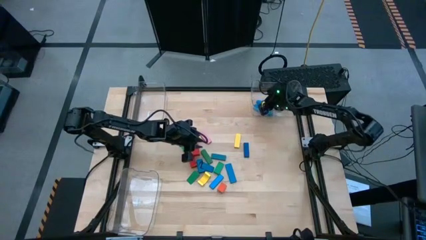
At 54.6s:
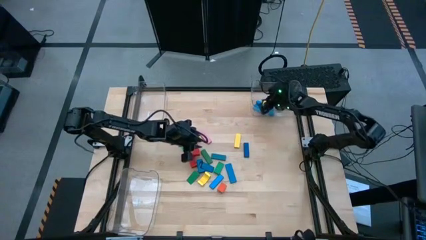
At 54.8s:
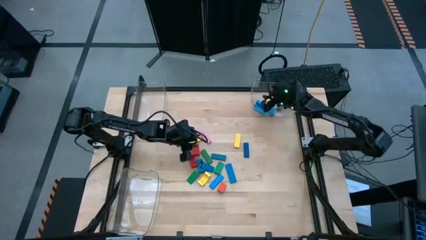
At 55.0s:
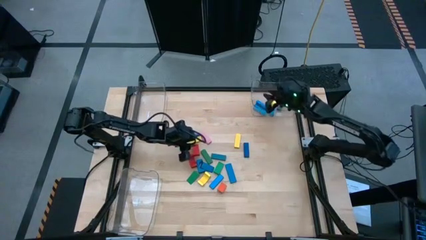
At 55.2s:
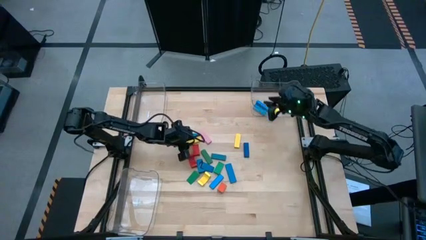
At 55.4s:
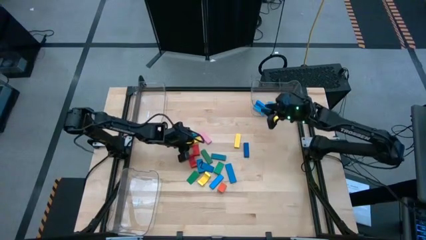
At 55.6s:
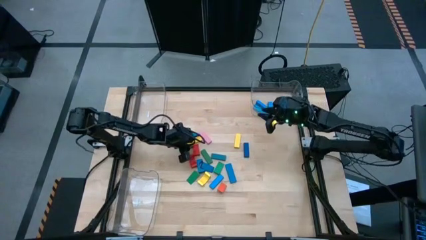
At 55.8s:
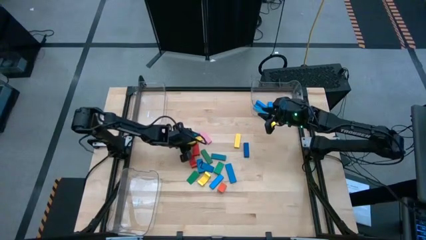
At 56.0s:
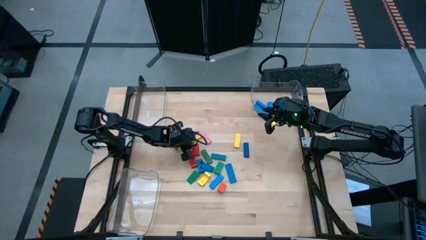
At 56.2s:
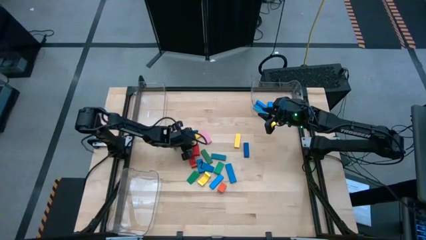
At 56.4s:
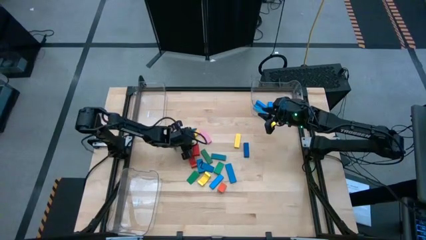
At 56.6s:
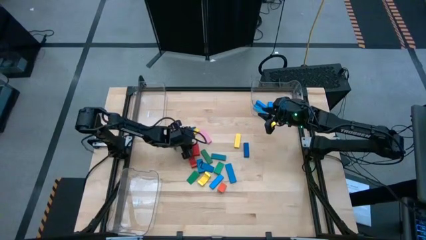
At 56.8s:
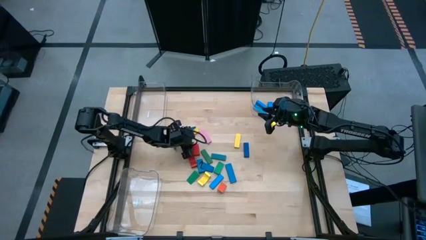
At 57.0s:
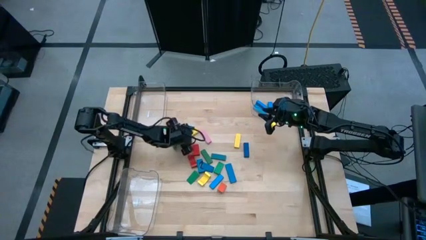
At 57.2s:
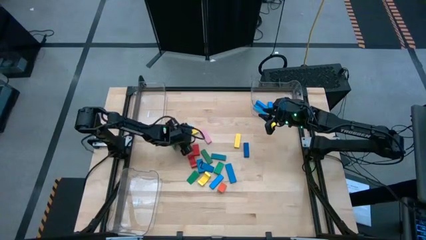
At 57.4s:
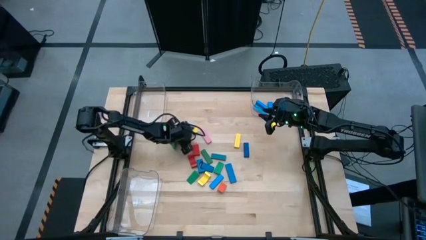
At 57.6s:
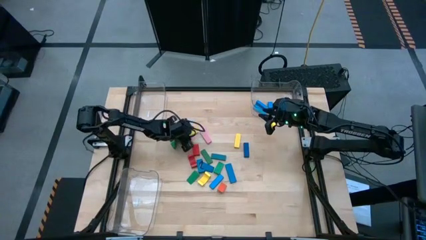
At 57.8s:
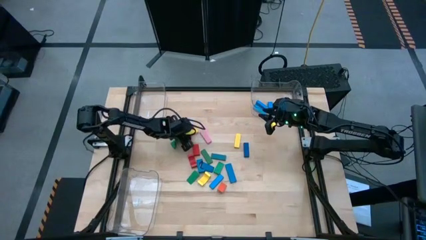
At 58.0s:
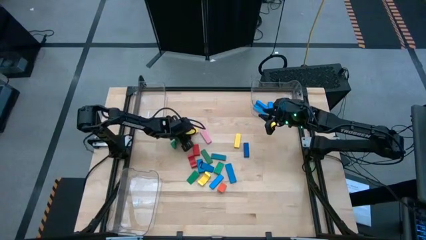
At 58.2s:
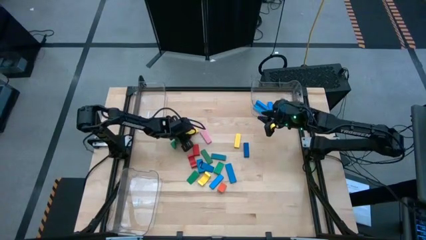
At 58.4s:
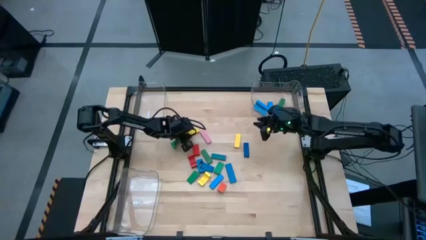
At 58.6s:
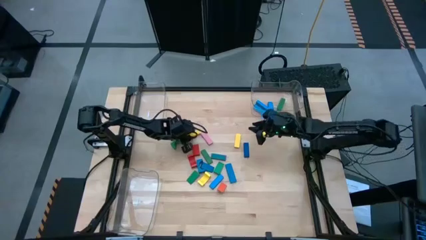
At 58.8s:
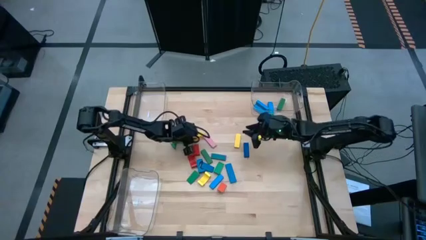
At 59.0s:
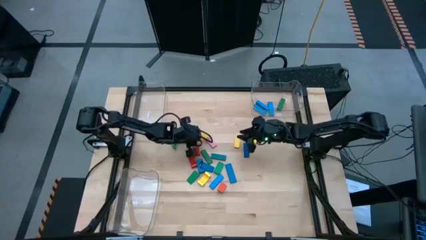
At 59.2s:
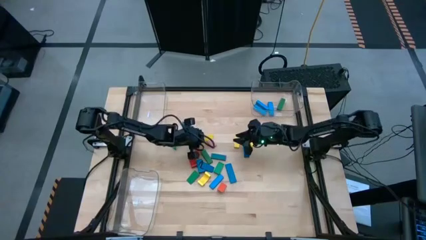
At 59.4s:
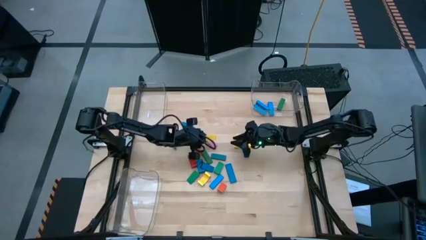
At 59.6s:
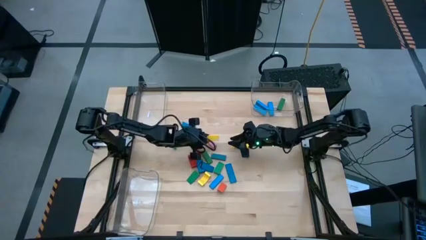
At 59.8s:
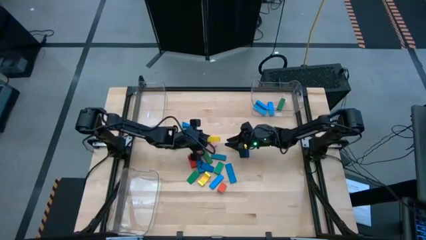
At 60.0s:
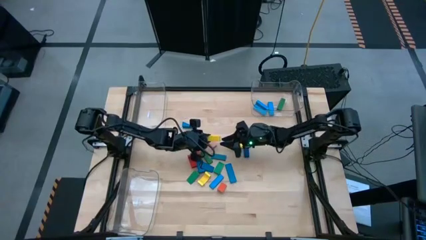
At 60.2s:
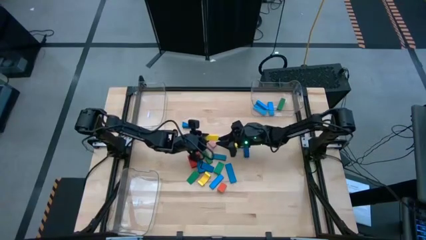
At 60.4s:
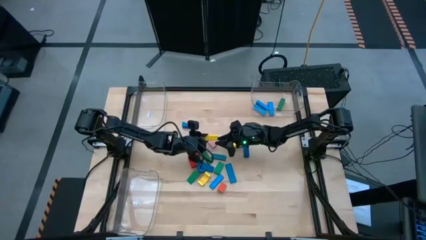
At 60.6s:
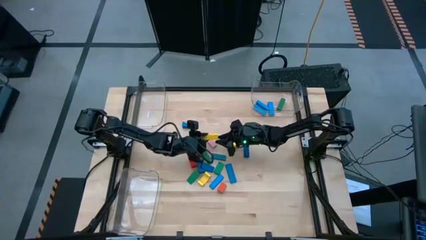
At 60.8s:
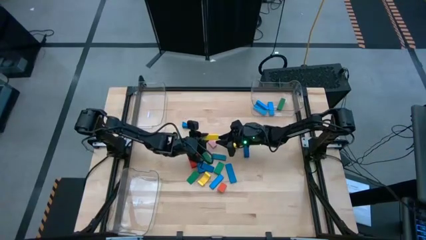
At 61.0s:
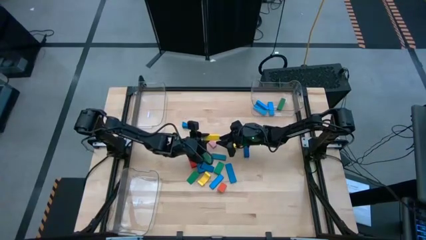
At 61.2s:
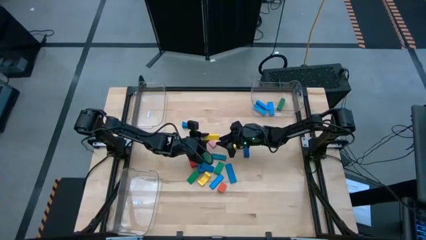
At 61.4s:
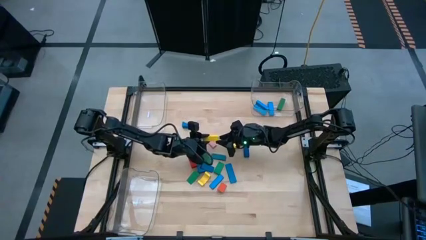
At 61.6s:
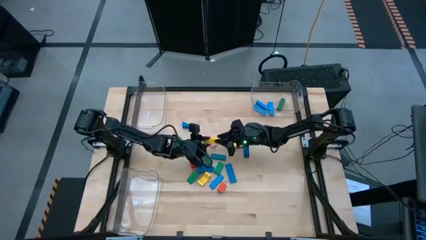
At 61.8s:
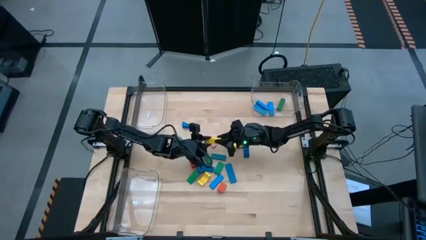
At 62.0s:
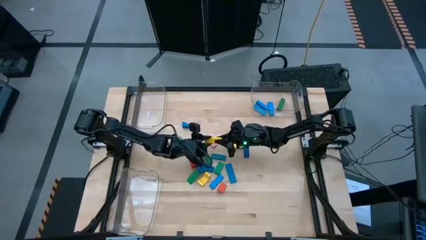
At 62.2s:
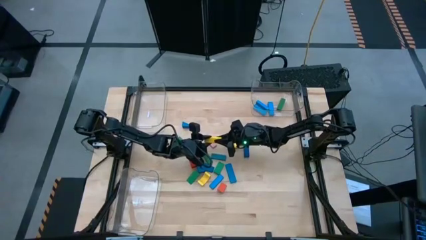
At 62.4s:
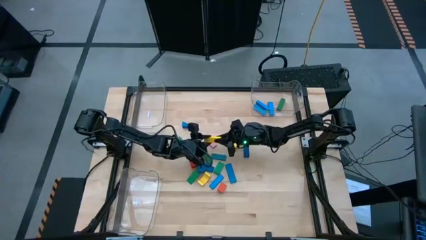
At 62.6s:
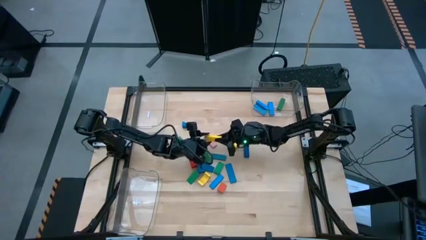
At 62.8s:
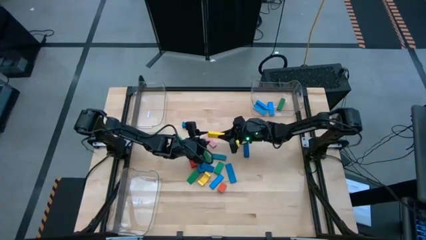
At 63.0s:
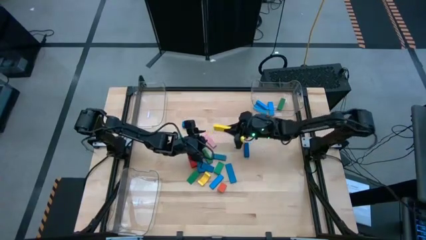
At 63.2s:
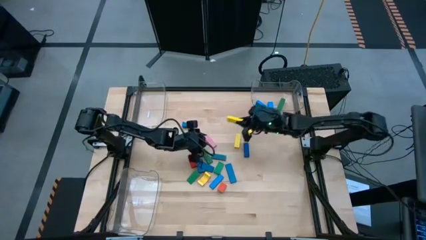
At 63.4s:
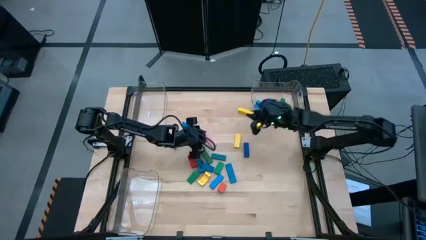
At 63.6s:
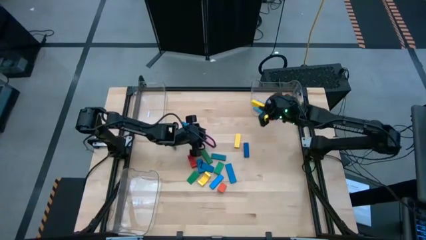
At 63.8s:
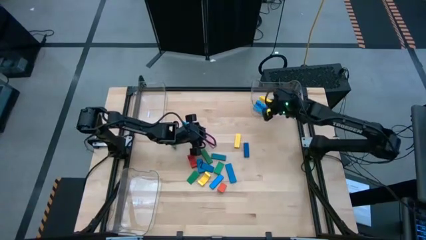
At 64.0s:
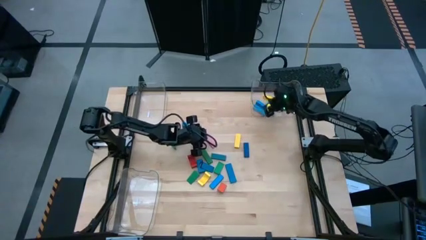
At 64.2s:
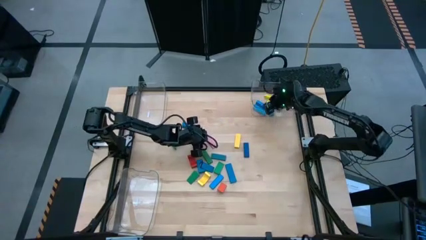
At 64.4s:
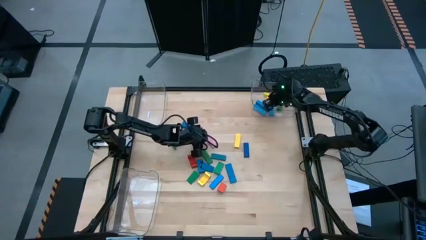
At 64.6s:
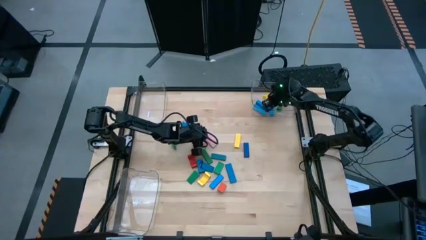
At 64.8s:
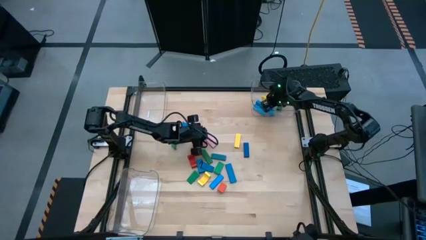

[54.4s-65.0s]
Task: Sort blocks by size
Put the yellow rectangular block into the top right transparent bin

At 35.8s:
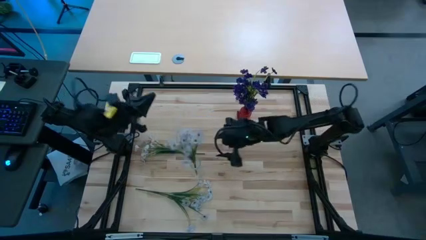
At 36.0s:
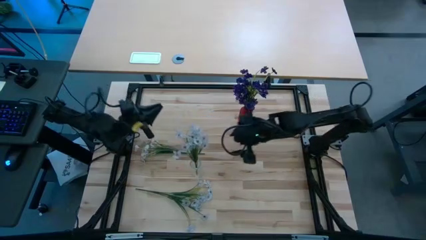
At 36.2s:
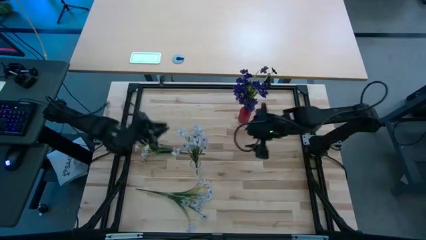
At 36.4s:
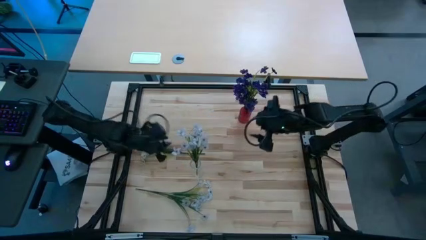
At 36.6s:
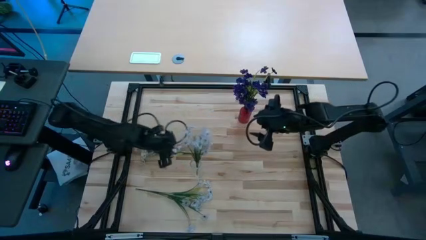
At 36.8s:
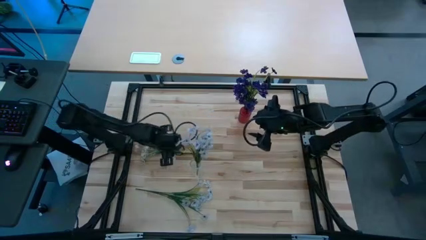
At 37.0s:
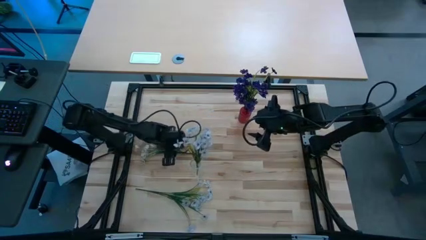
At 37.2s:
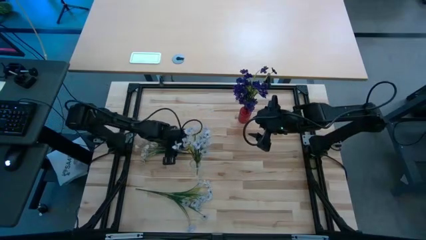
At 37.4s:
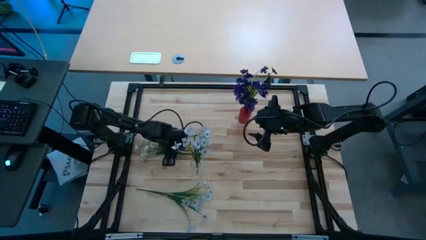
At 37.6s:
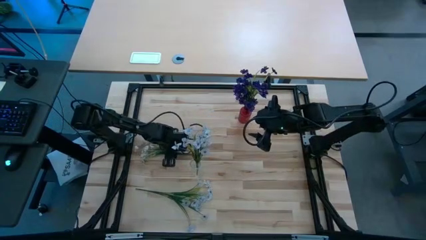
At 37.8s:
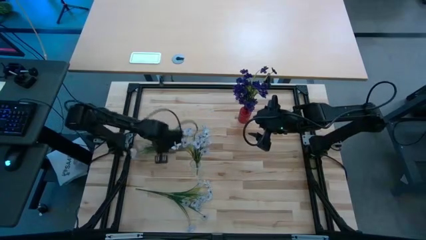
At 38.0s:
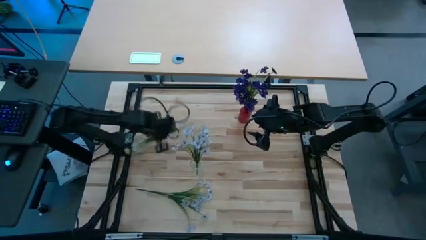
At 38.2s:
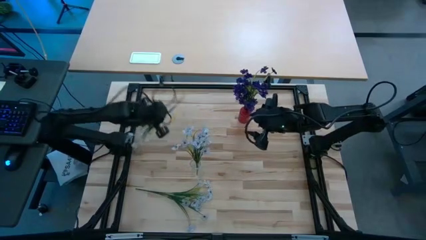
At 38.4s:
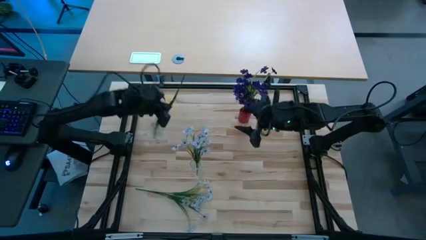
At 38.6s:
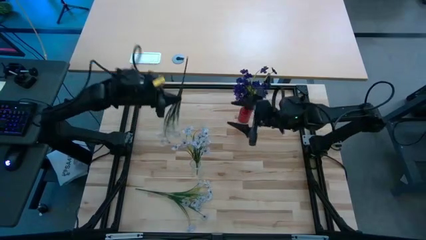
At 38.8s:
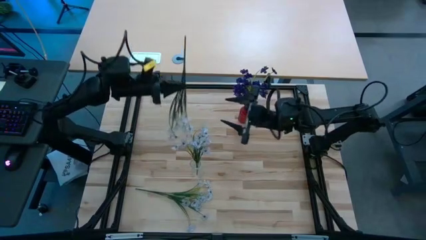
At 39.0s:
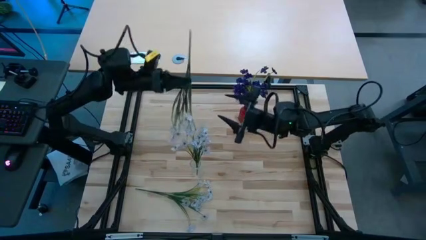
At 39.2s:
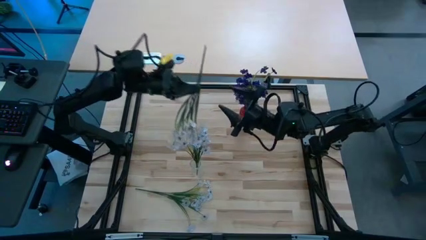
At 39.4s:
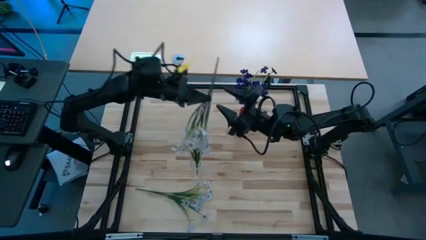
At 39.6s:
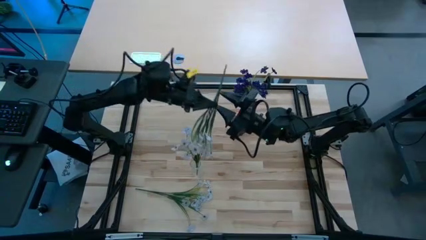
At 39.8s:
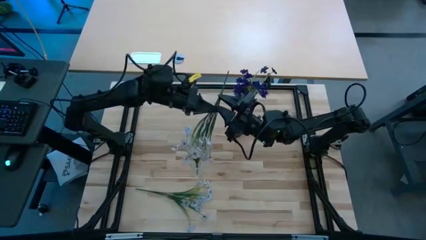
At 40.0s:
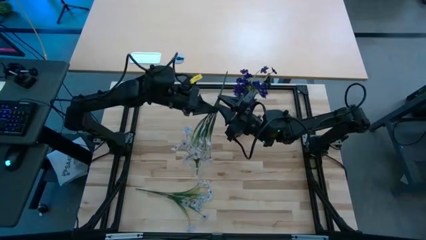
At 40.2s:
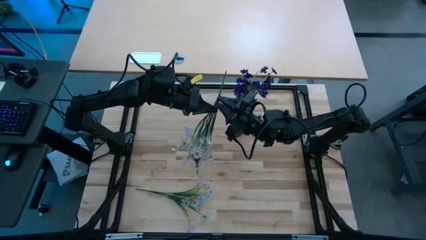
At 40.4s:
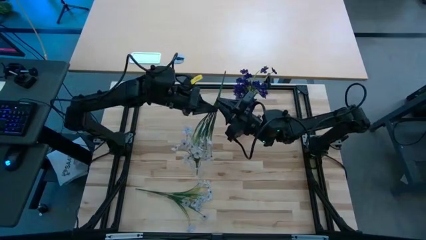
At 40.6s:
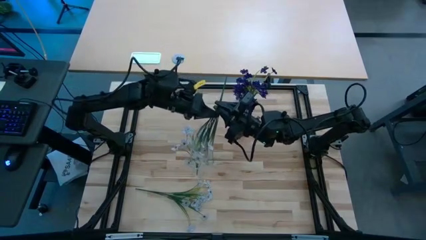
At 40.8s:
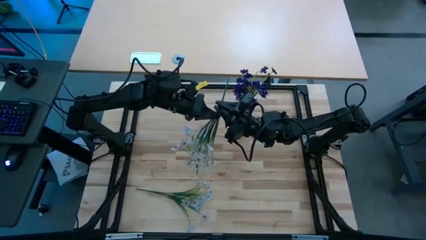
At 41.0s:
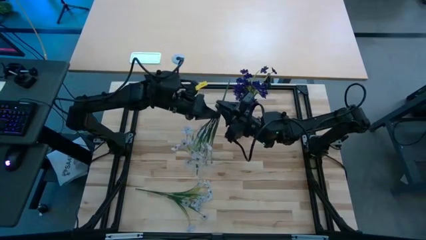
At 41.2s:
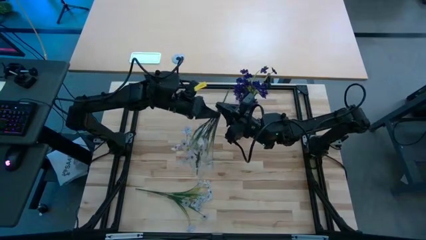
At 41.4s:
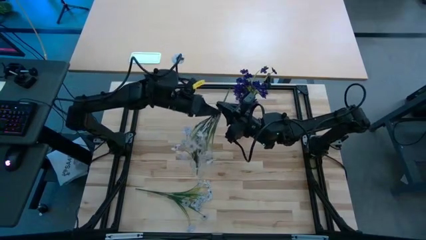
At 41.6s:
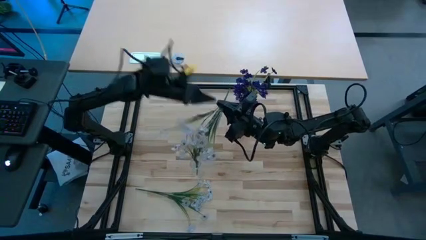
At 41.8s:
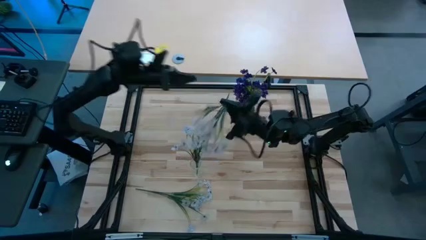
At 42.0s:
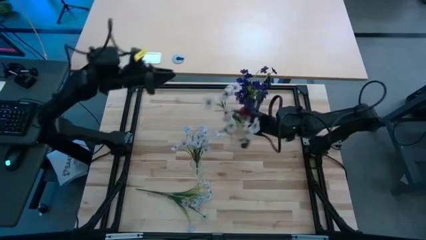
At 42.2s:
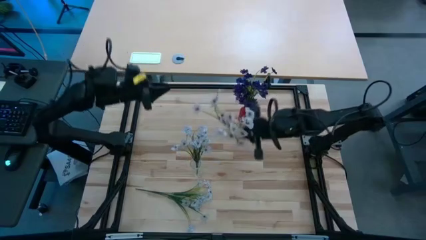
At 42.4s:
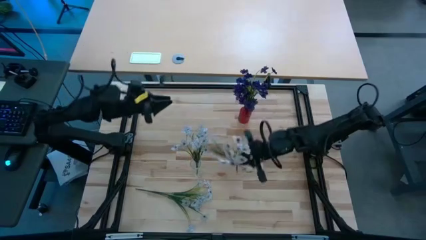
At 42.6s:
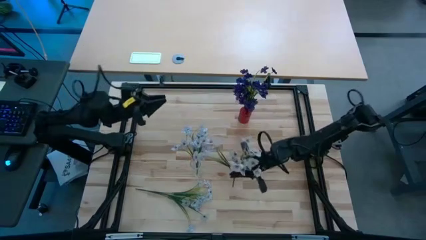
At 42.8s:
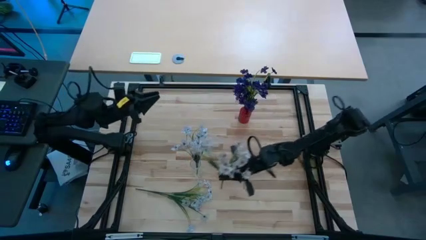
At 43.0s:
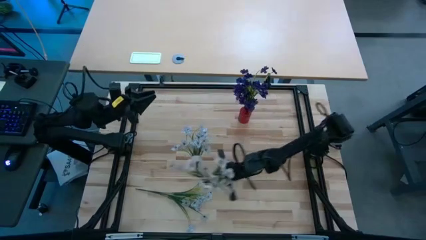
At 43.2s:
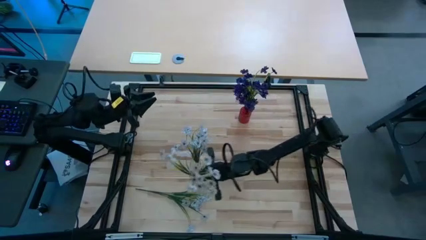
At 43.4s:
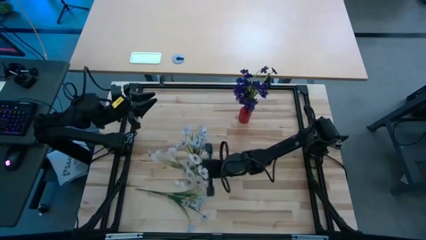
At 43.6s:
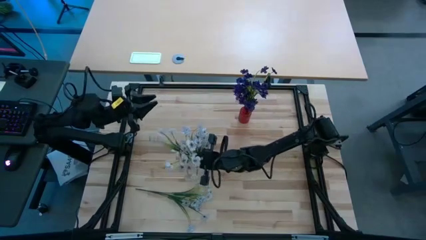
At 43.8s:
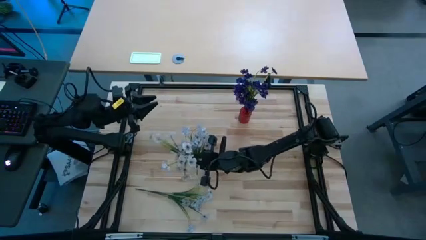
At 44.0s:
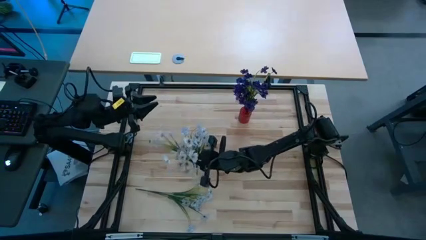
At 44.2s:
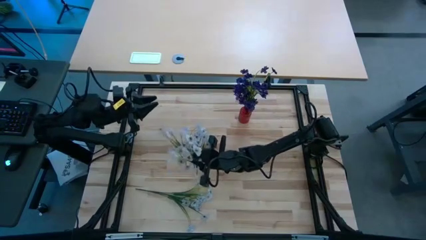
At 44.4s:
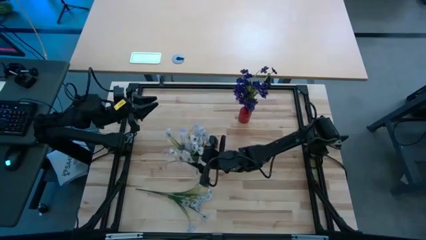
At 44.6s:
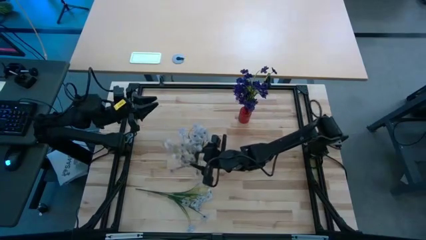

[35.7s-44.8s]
Task: Sort flowers into vase by color
Put the top white flowers into the transparent vase
